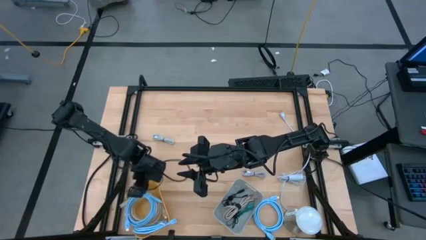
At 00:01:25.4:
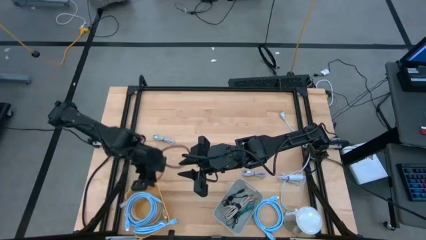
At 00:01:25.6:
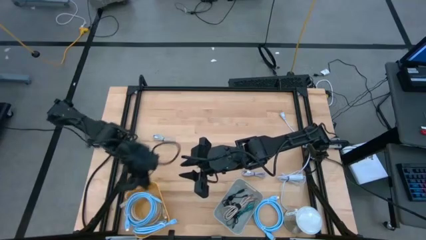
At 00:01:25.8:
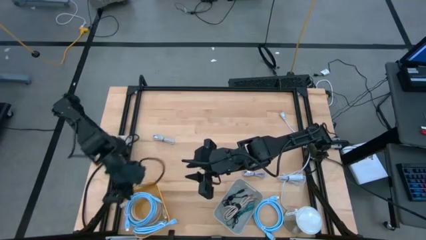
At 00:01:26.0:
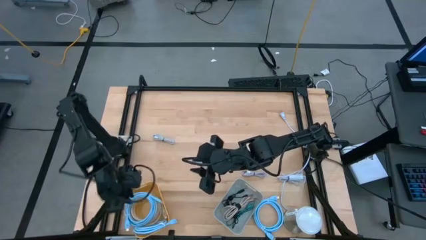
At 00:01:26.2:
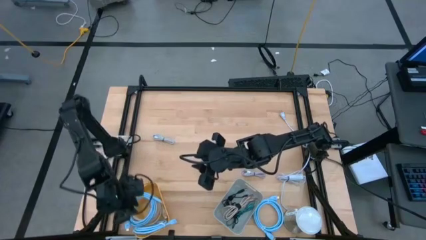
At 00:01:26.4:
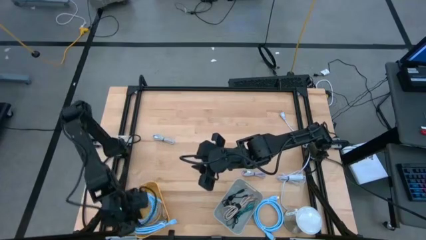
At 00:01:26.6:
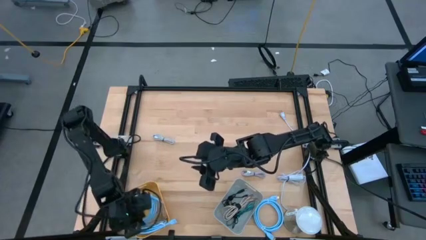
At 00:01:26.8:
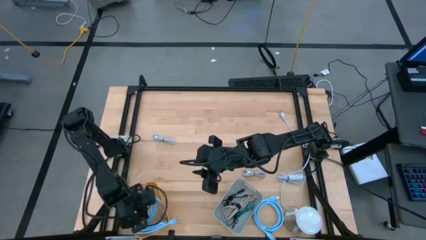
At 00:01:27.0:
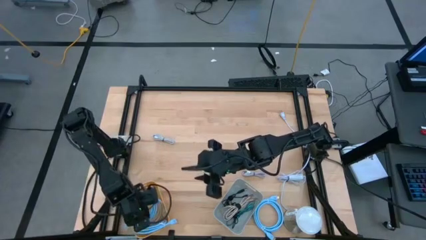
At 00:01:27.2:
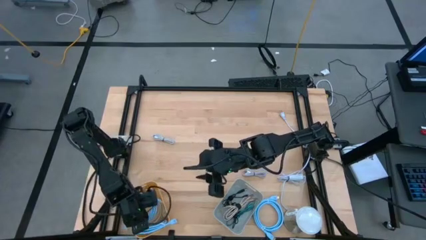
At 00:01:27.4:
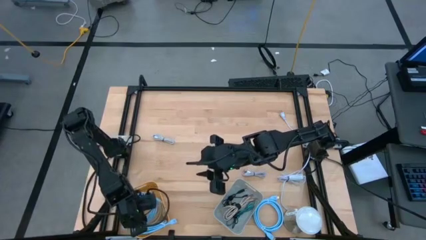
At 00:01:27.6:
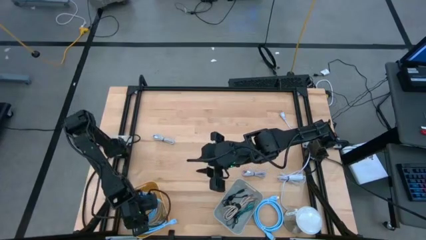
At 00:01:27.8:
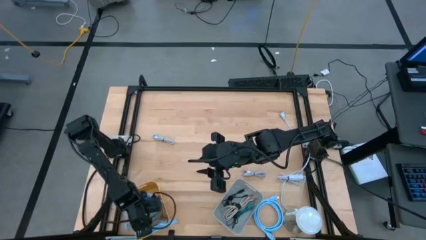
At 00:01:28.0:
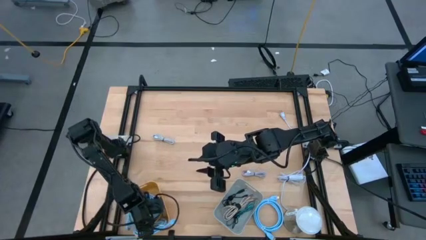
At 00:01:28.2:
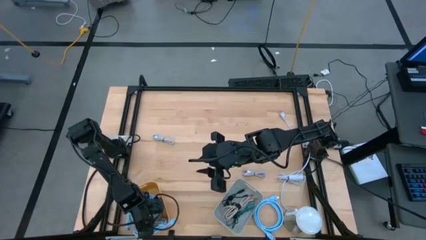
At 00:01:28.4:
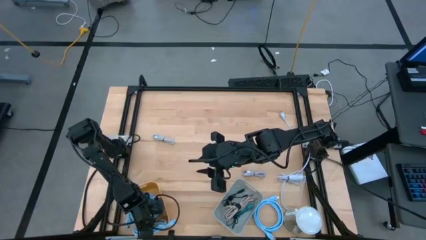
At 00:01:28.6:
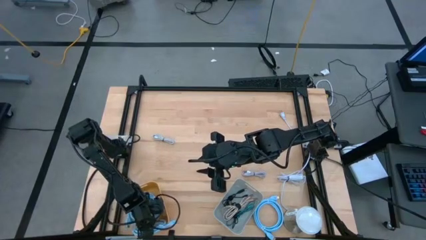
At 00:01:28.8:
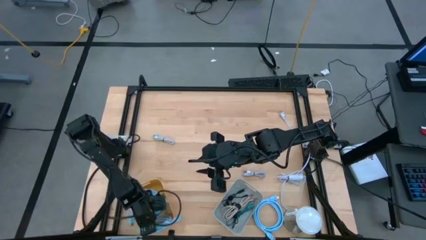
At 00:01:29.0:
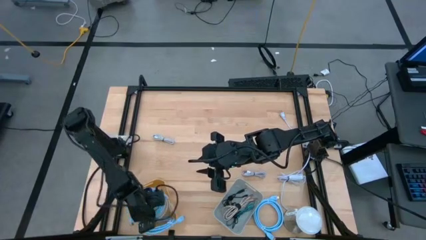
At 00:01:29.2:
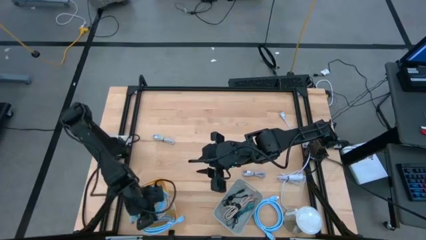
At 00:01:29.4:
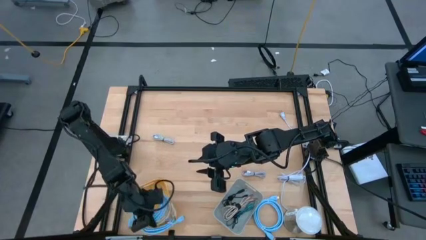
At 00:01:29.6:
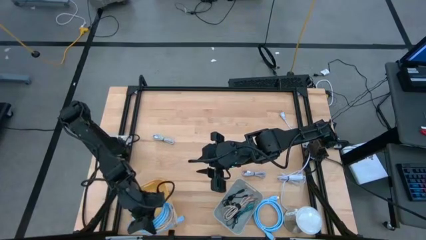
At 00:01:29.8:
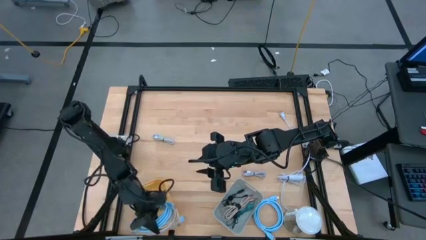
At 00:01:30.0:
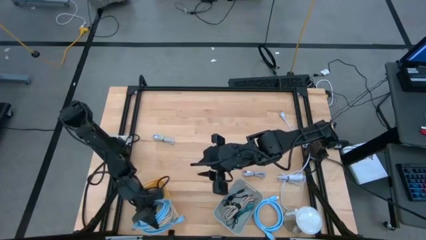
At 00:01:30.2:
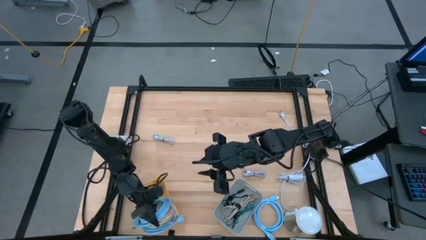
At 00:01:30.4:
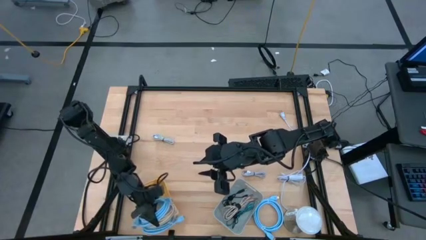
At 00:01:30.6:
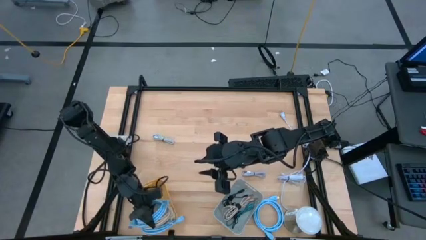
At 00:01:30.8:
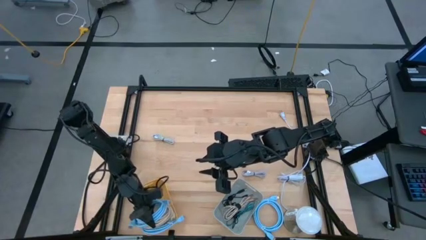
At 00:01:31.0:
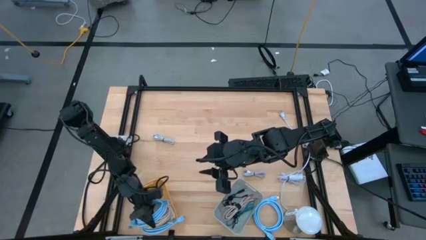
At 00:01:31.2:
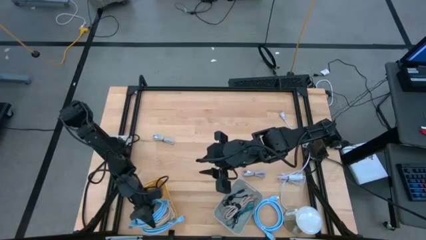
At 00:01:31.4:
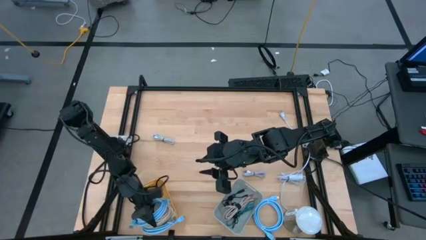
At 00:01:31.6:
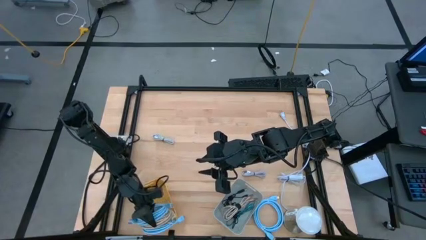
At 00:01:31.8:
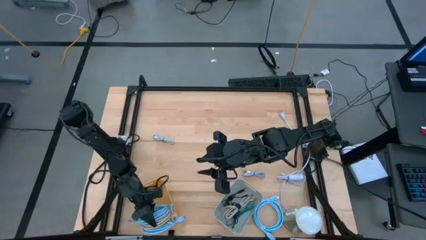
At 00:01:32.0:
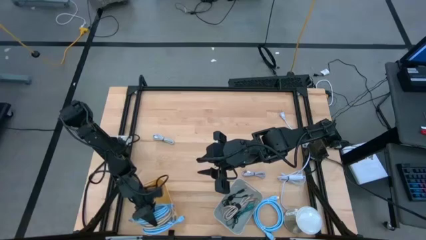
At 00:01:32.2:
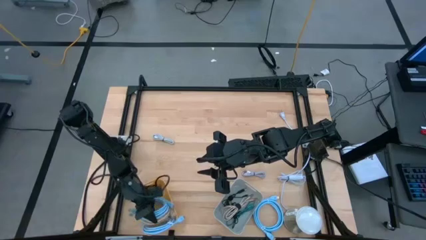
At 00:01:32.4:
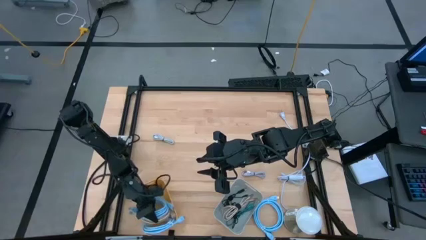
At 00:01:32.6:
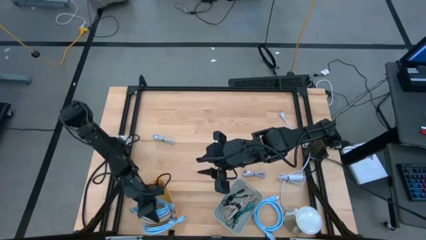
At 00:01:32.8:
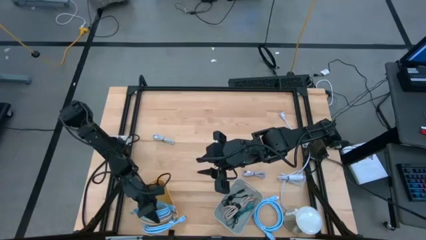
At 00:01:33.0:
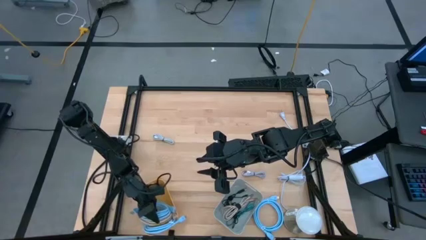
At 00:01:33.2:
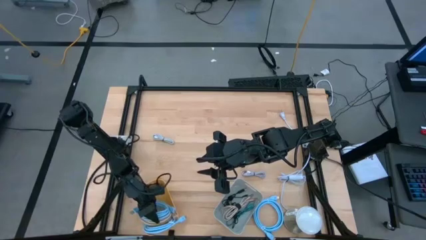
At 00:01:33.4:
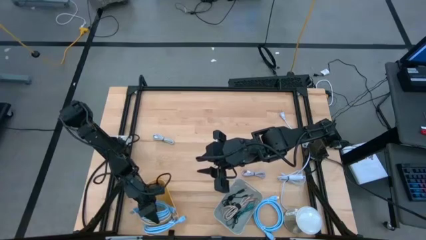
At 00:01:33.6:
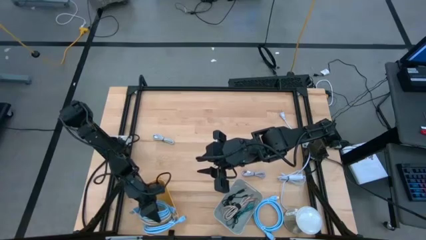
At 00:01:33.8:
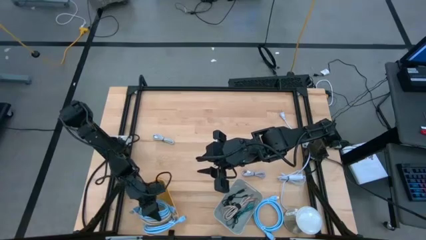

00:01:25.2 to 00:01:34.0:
Task: Sort cables
Adjust the HDMI cables in the yellow bin

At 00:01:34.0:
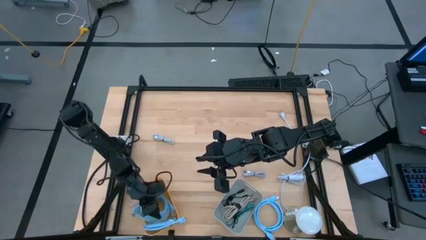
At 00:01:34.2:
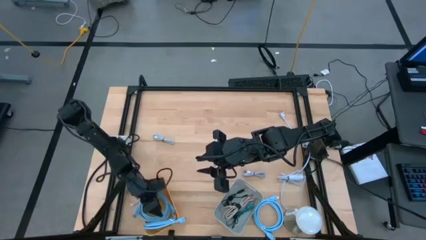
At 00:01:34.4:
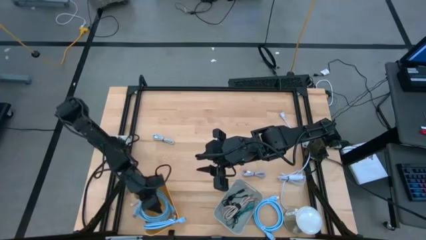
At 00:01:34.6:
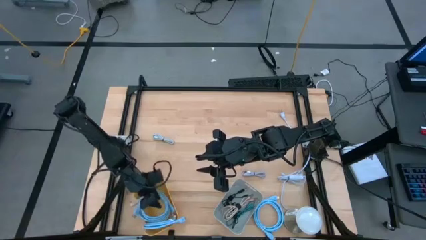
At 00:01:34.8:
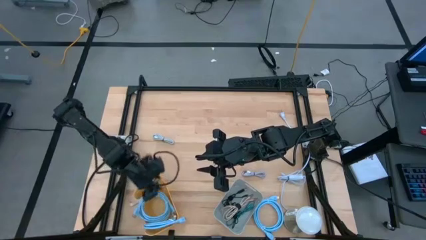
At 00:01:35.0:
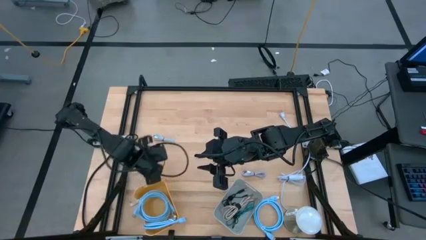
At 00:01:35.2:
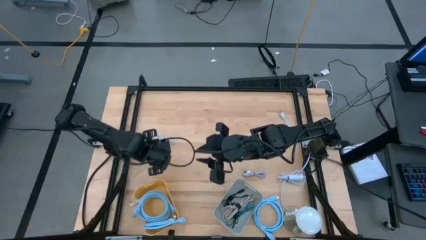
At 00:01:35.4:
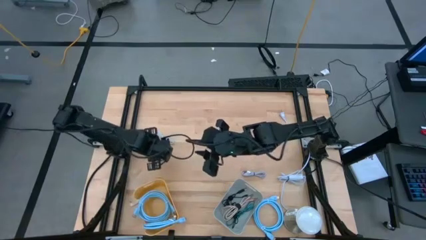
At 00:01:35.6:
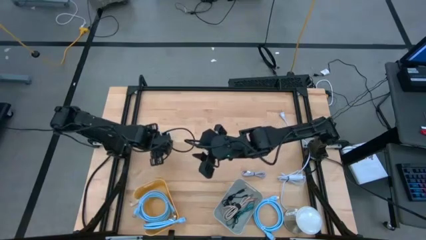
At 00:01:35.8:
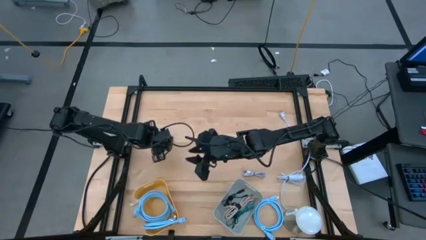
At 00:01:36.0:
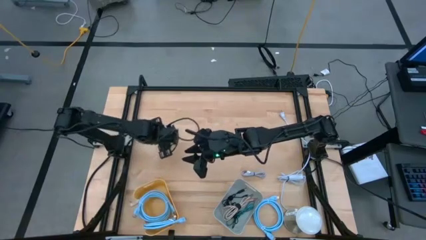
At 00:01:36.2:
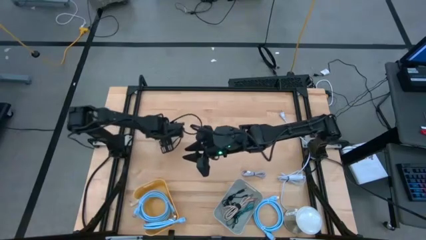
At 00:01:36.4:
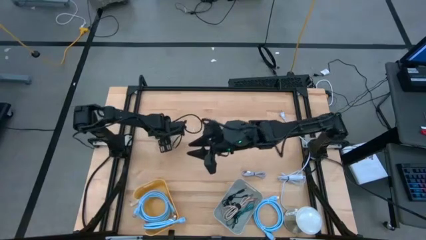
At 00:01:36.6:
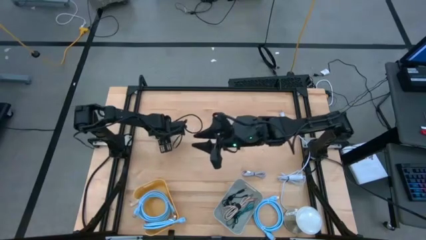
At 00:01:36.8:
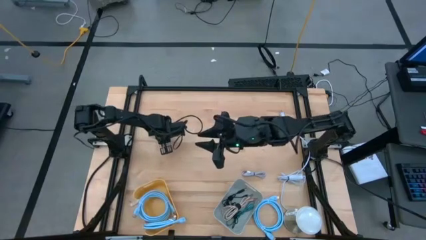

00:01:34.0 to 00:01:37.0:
Put the gray charger cable into the gray bin

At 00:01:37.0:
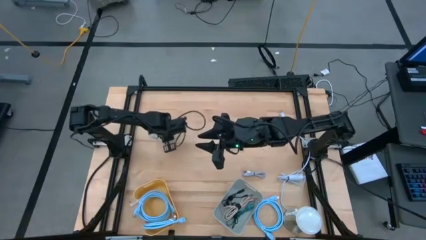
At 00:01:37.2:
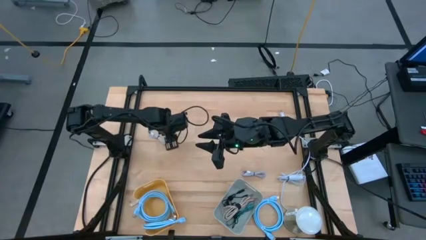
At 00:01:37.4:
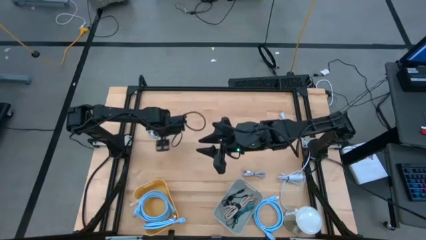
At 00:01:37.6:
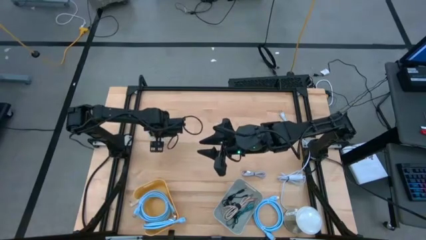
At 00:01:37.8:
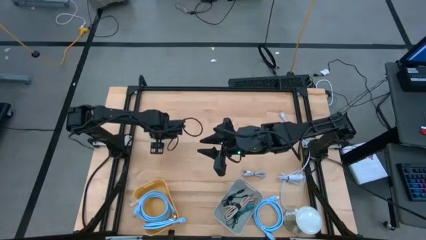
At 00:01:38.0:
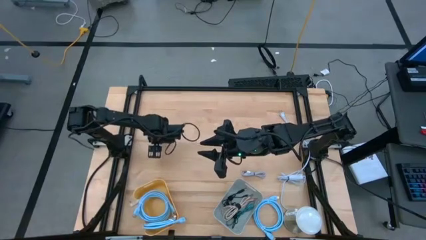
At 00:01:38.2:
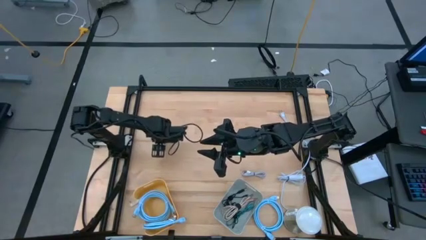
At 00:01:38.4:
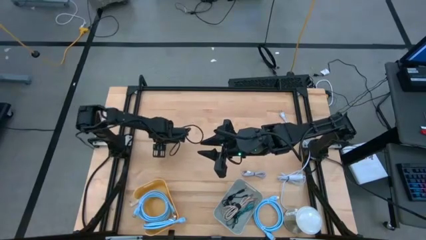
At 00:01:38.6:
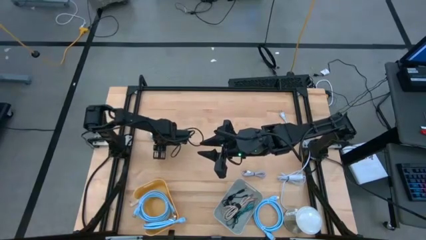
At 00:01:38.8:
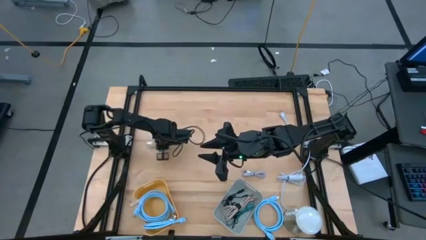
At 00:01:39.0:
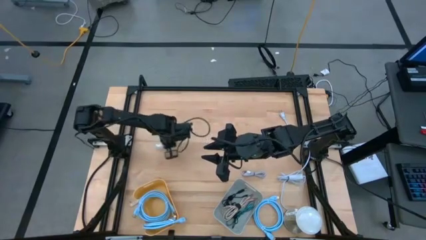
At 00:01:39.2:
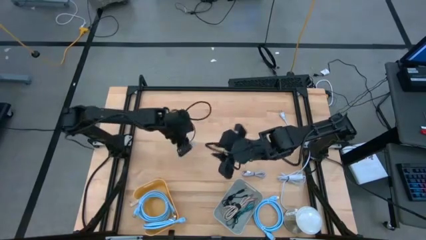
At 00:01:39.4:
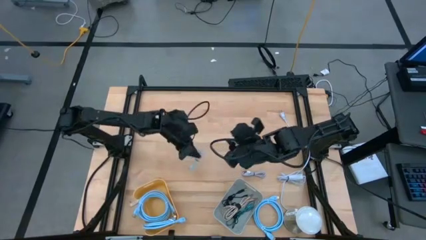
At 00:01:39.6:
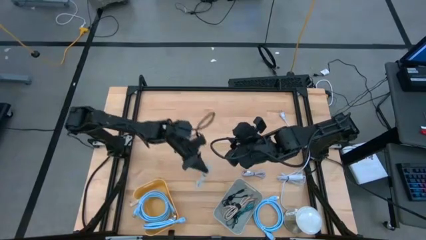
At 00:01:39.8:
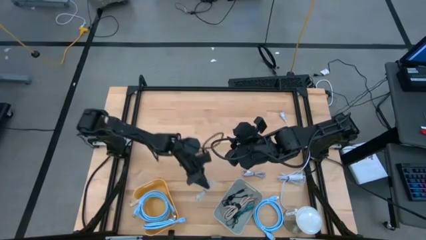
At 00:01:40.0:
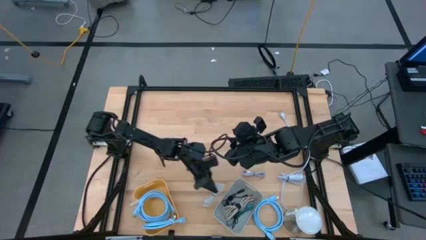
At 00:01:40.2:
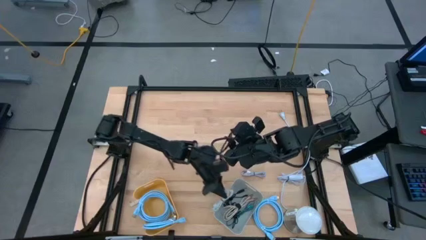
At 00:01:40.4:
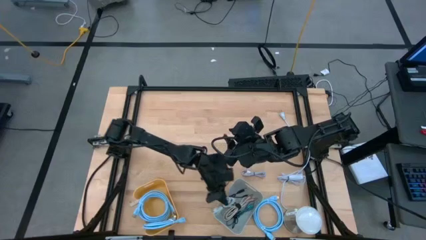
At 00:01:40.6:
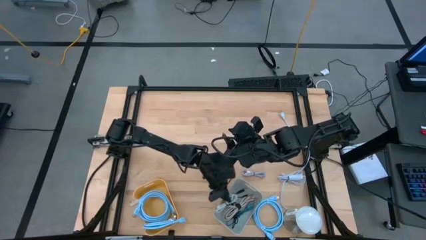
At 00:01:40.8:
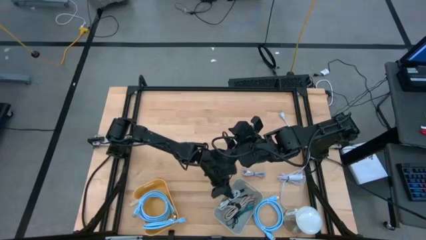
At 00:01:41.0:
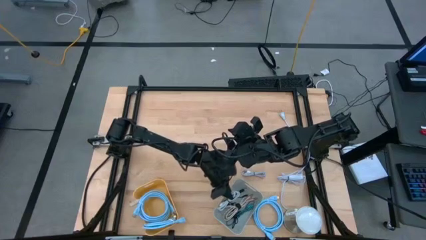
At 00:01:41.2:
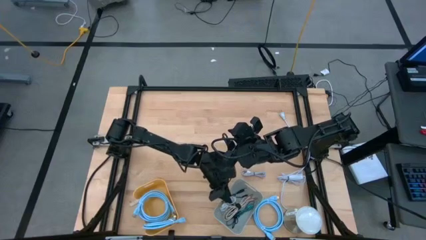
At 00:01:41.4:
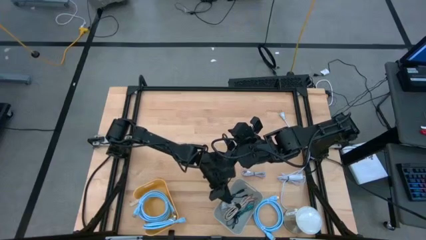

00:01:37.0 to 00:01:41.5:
Put the gray charger cable into the gray bin
